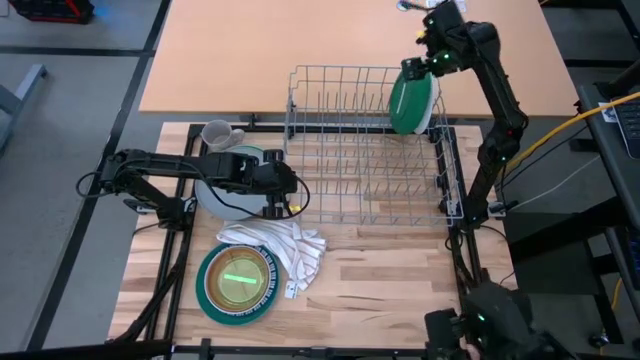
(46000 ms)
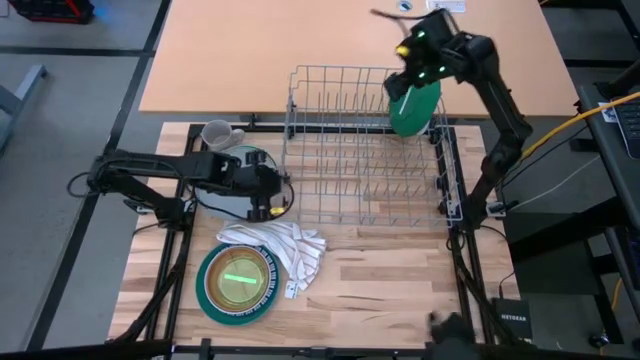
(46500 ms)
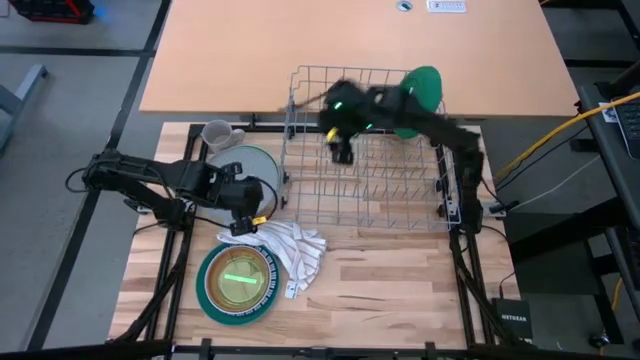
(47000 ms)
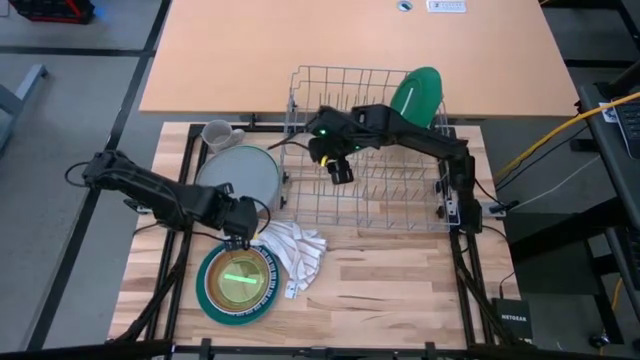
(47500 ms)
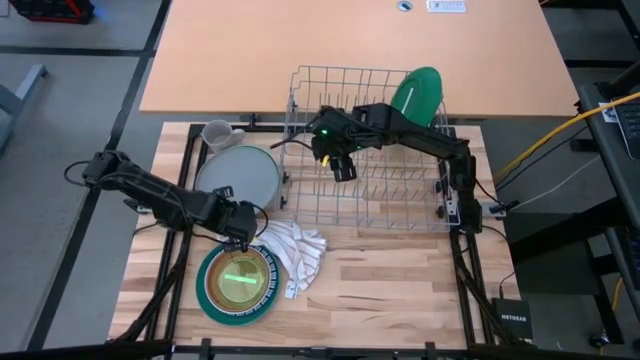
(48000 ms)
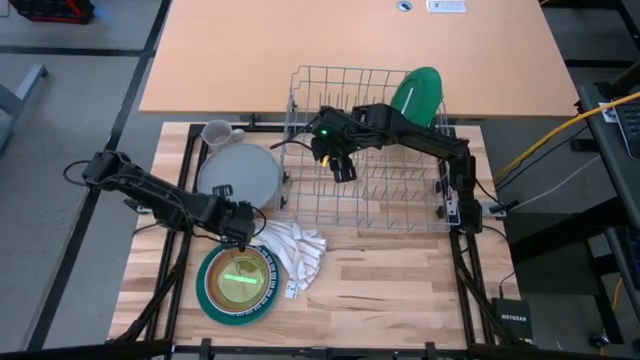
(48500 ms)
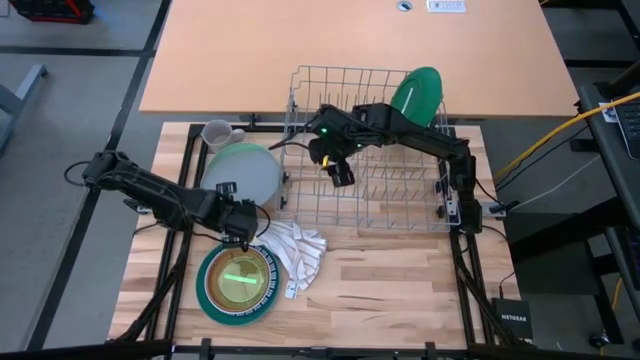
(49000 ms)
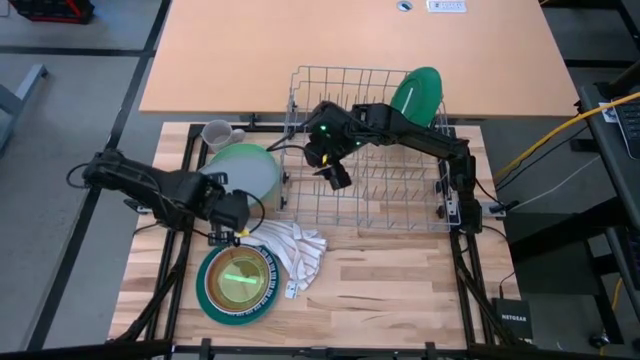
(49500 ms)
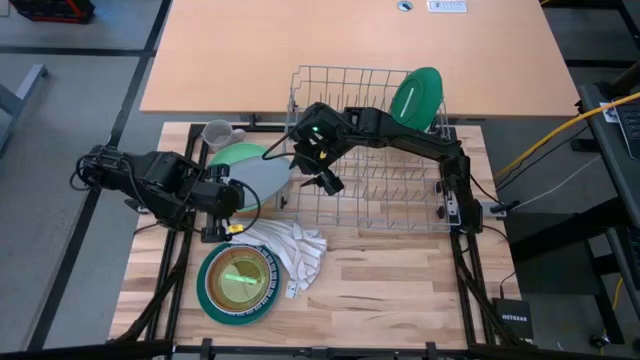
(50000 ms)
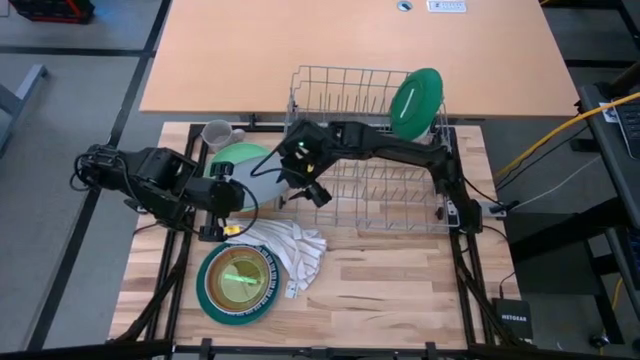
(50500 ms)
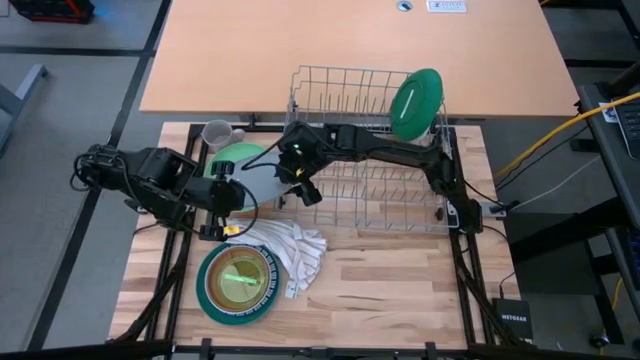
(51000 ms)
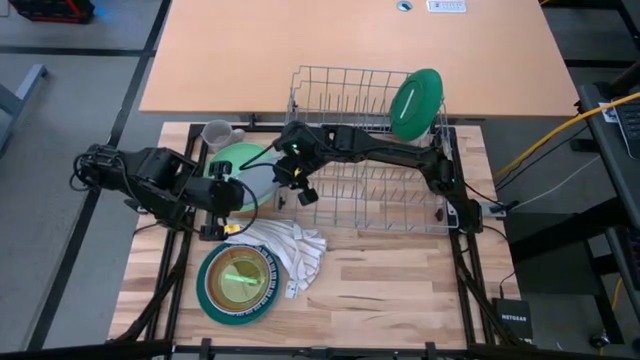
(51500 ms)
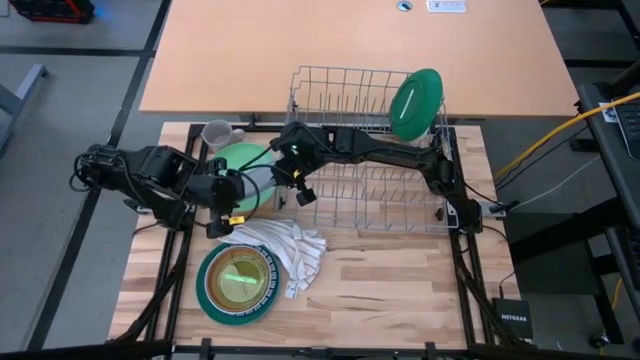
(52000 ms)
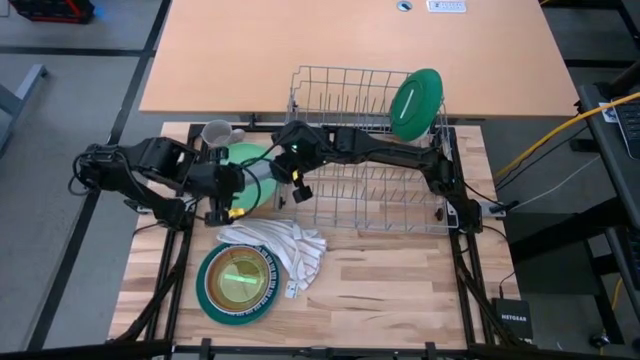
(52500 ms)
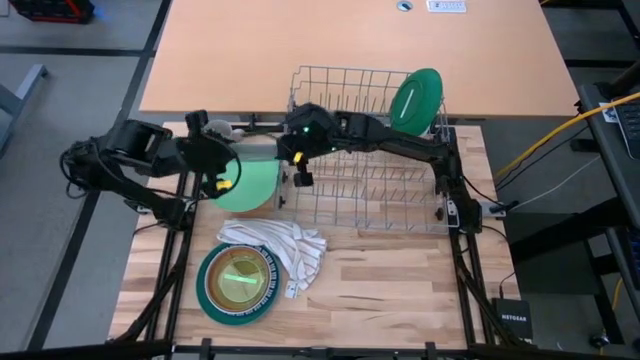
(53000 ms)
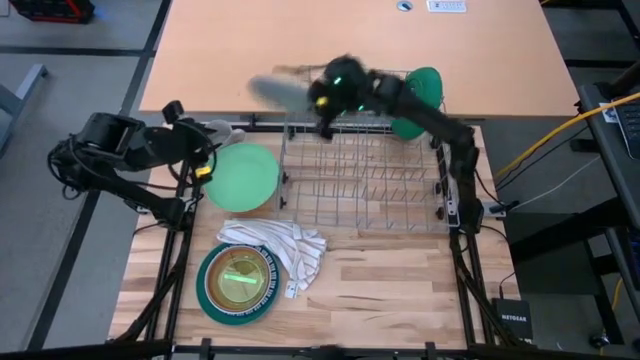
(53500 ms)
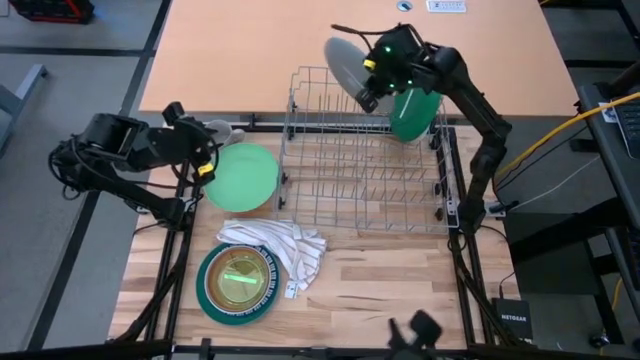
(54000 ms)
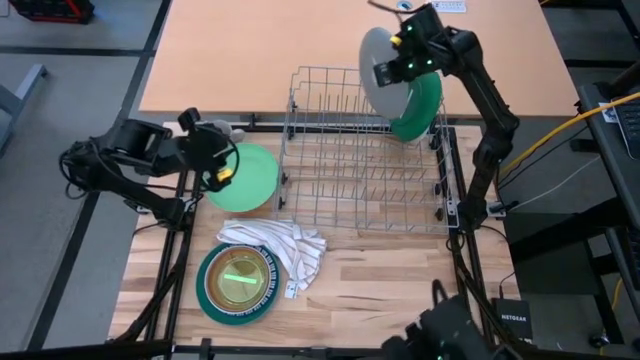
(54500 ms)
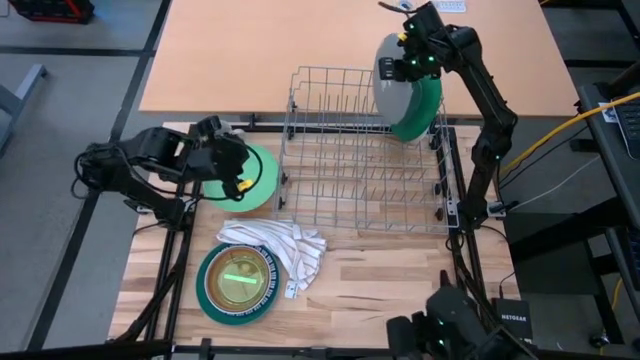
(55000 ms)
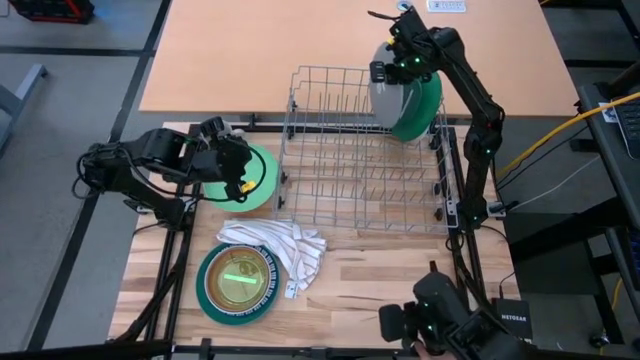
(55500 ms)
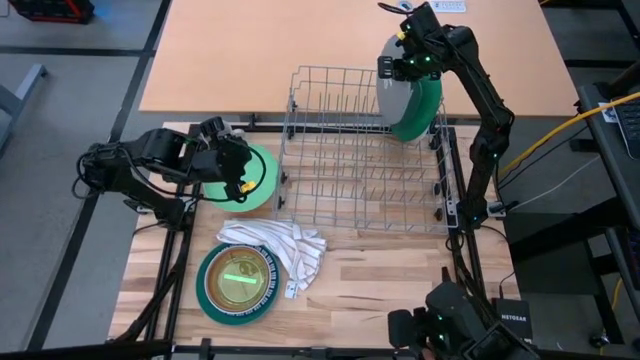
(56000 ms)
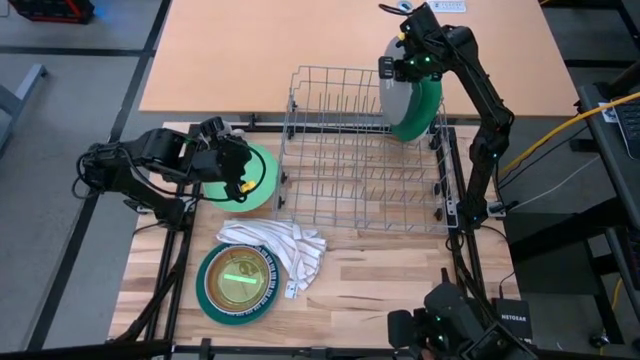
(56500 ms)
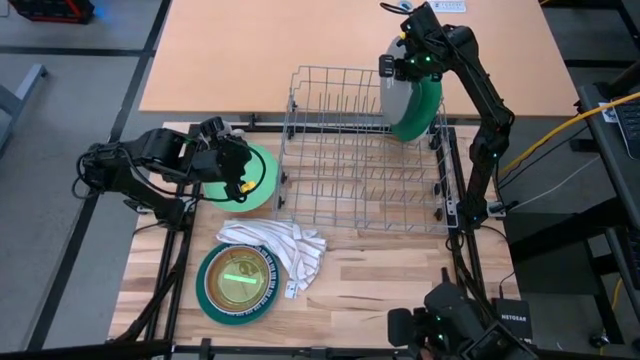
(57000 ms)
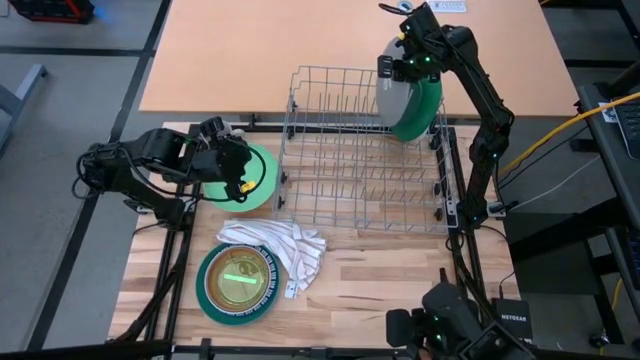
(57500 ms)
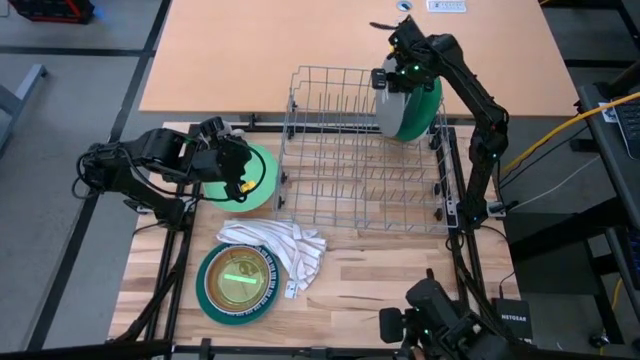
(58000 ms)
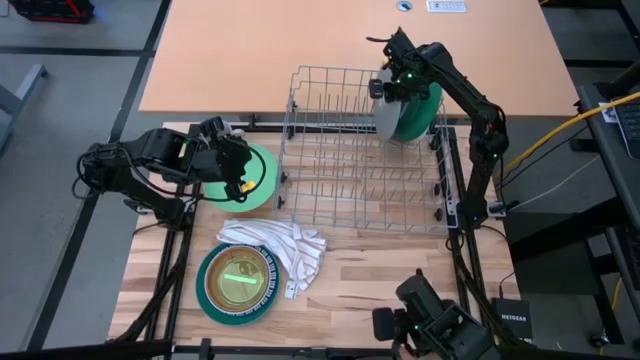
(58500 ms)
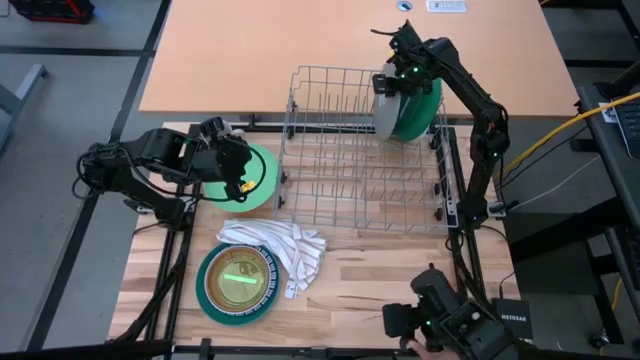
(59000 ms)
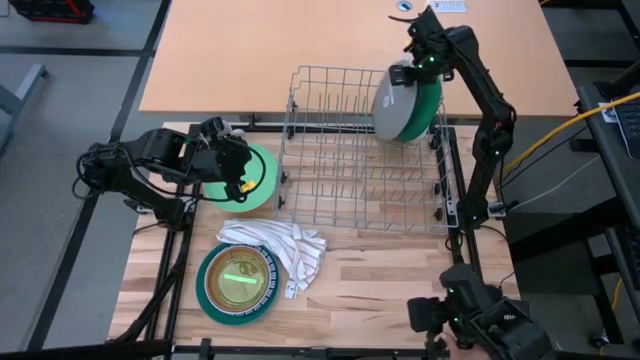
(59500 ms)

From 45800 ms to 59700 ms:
Task: Sort dishes
Put the gray plate into the dish rack

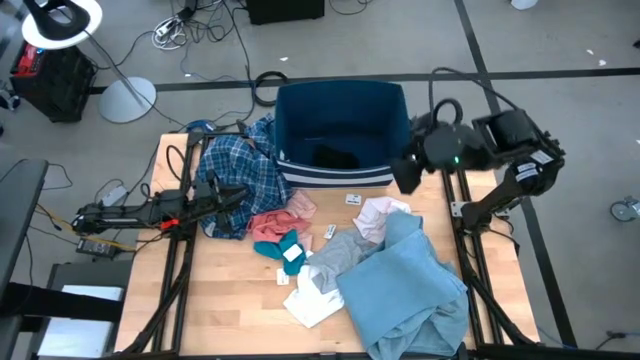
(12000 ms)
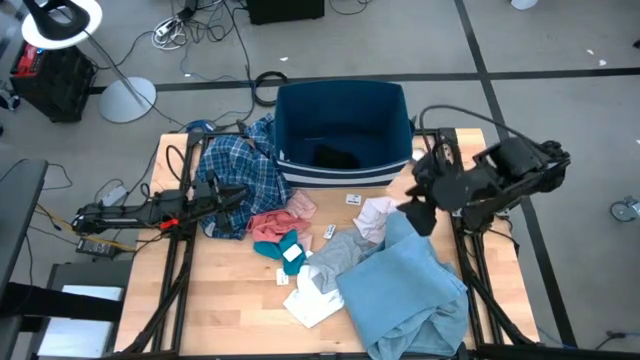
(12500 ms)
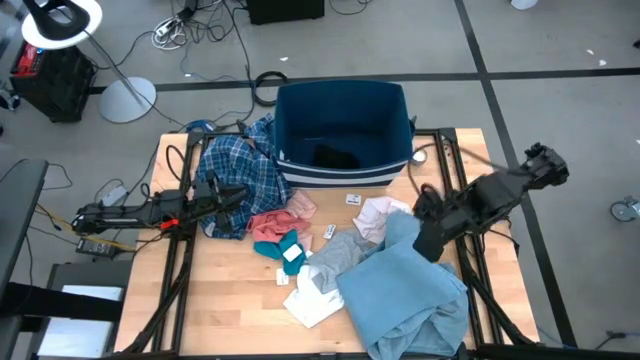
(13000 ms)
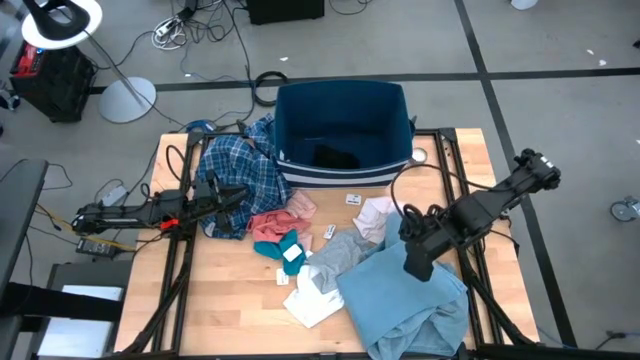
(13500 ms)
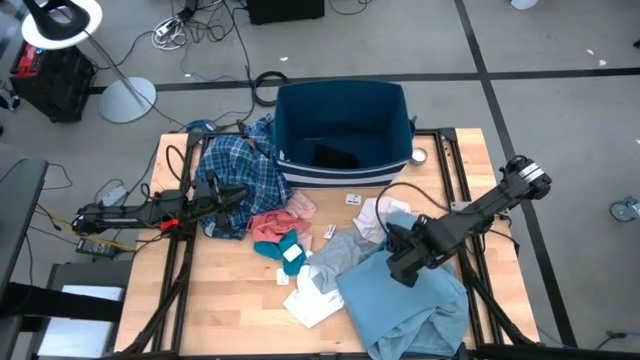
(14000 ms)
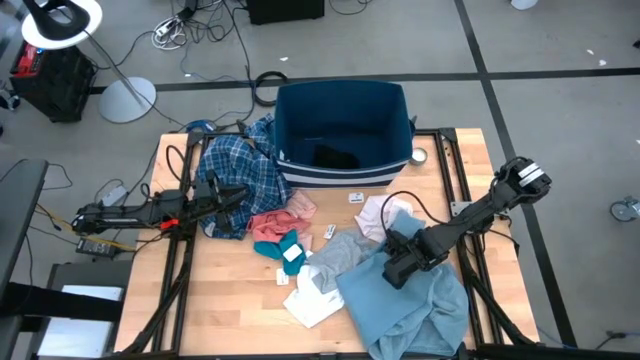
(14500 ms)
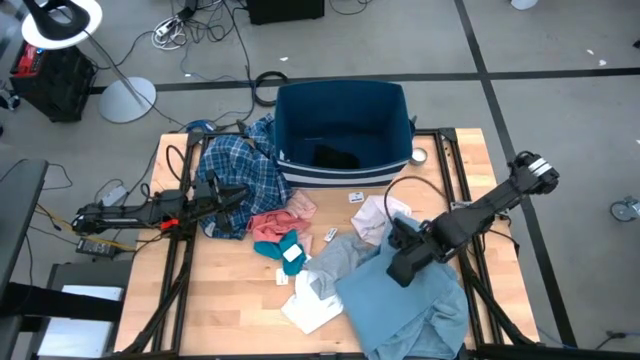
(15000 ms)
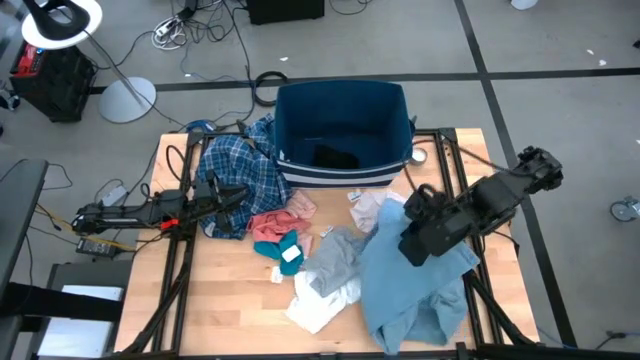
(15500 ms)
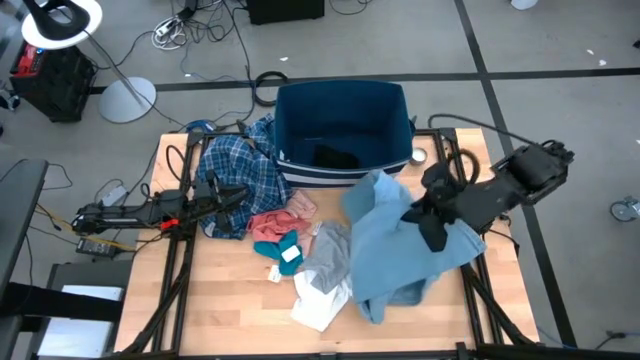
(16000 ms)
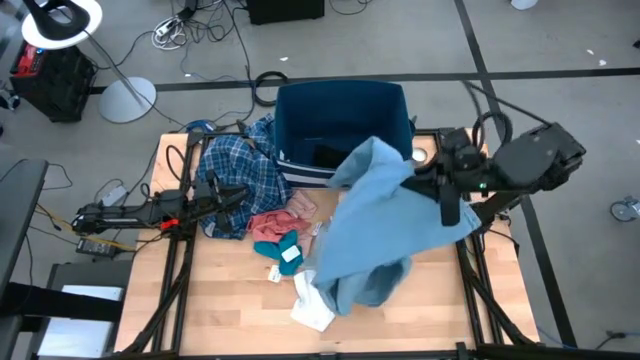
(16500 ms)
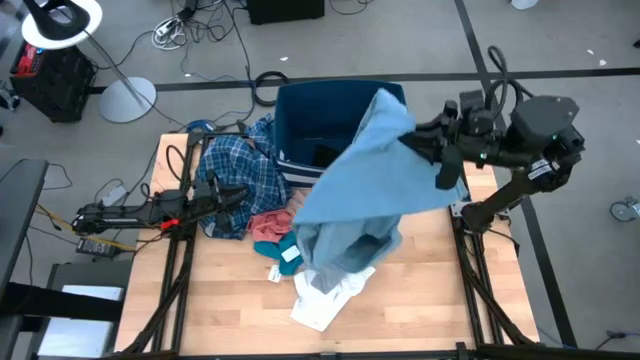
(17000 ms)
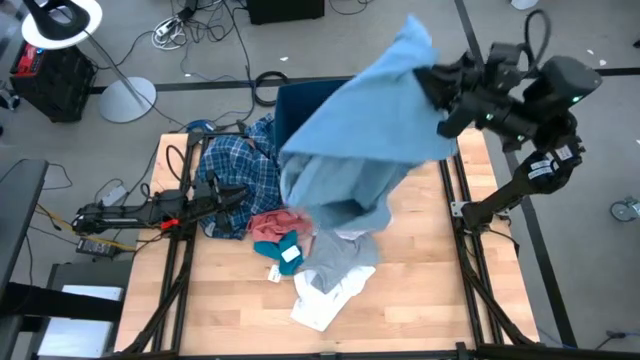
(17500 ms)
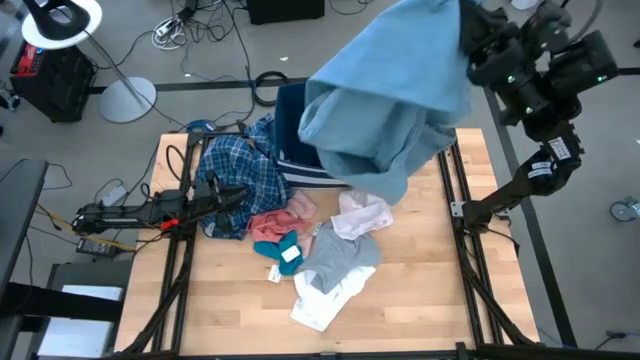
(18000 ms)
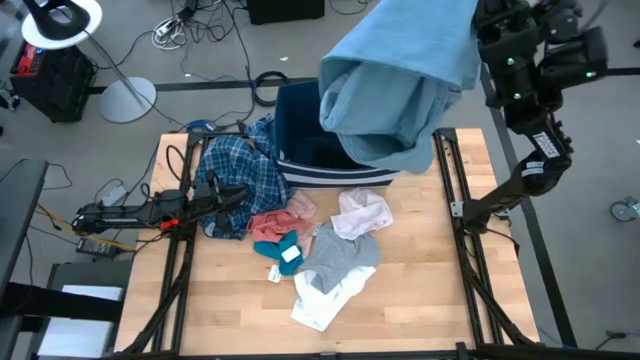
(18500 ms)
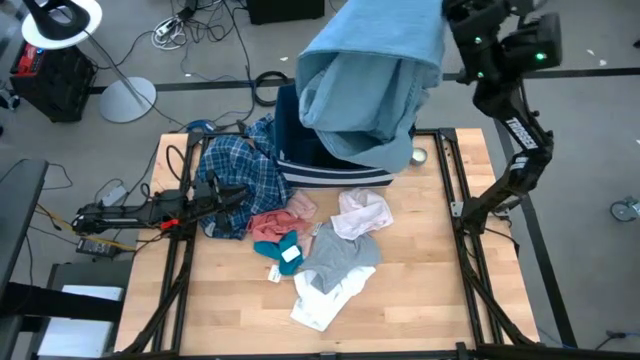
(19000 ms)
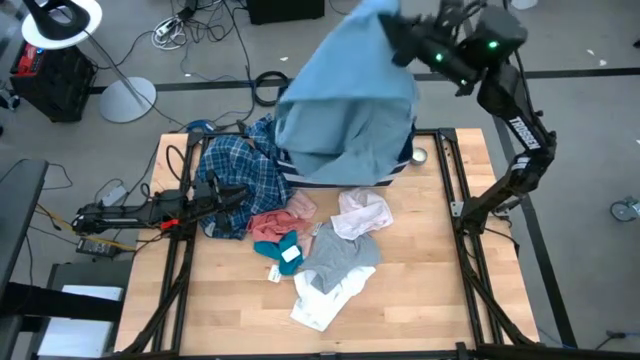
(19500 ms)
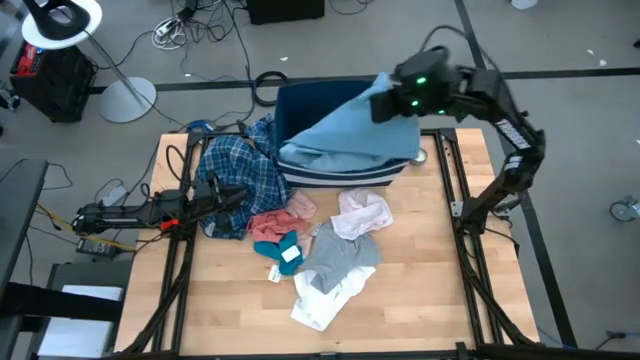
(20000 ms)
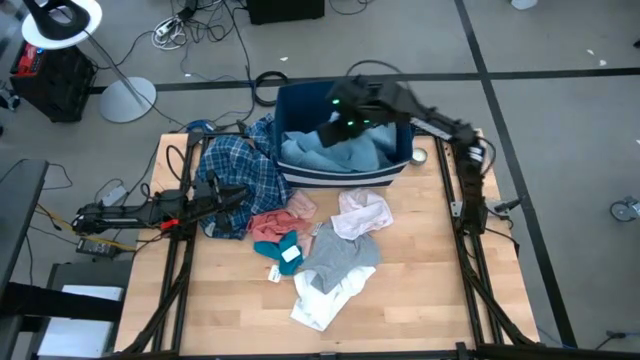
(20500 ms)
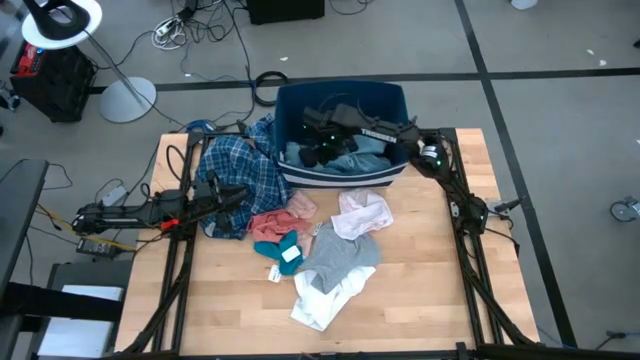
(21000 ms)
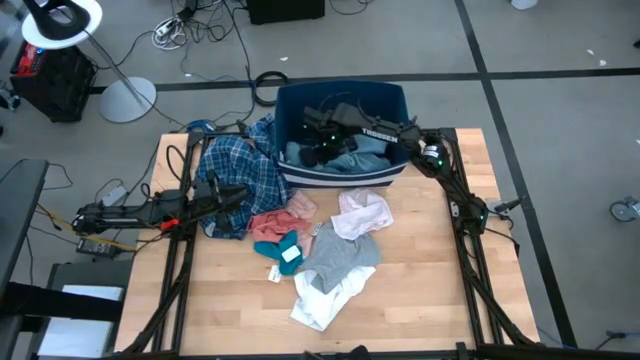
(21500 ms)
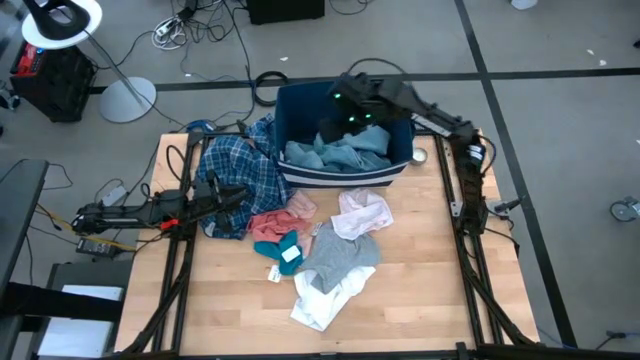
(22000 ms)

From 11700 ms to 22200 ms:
Task: Sort clothes
Put the blue pants into the blue bin
